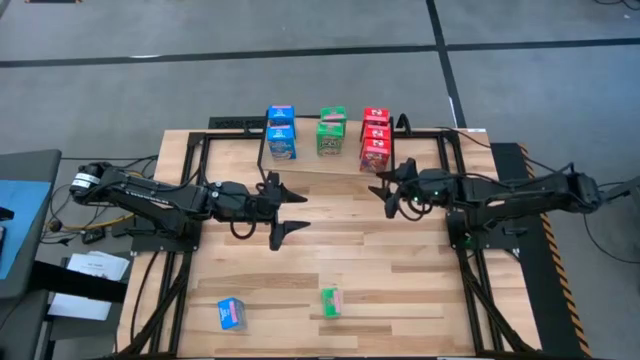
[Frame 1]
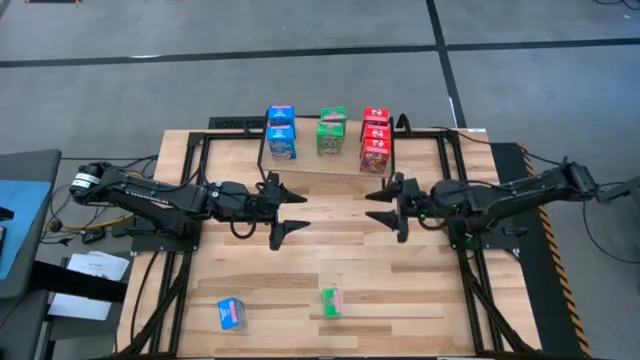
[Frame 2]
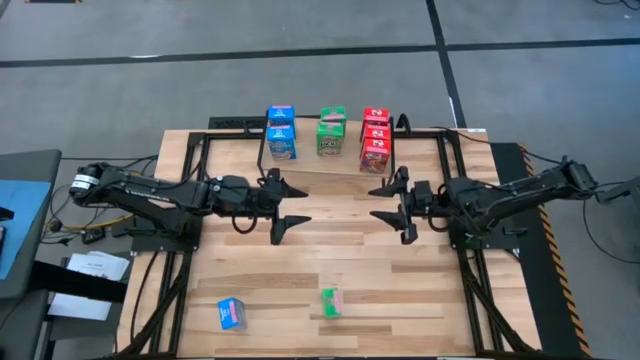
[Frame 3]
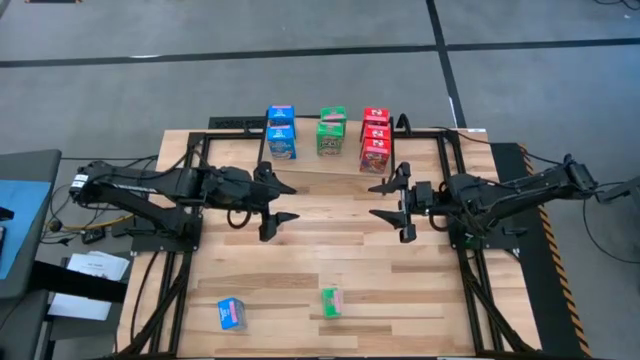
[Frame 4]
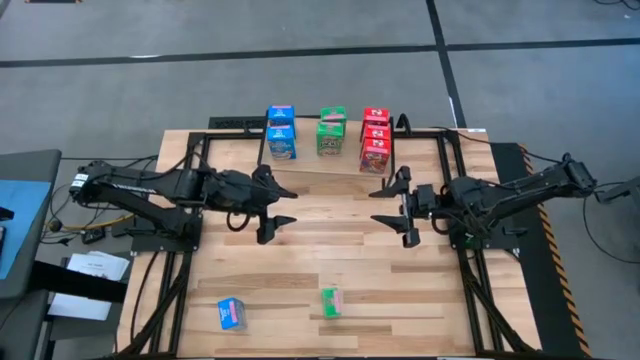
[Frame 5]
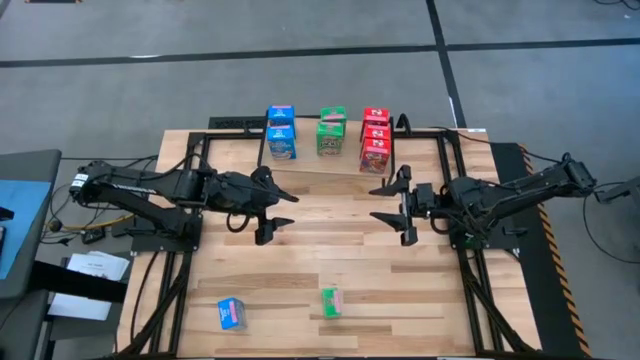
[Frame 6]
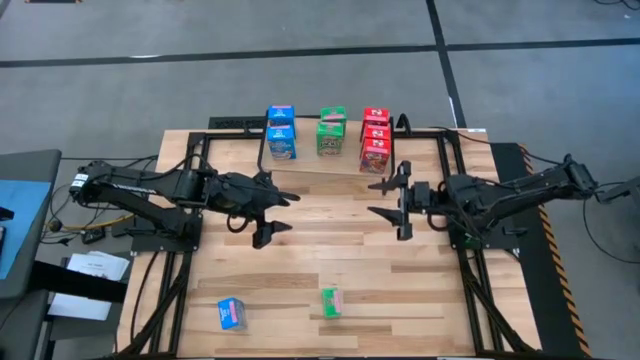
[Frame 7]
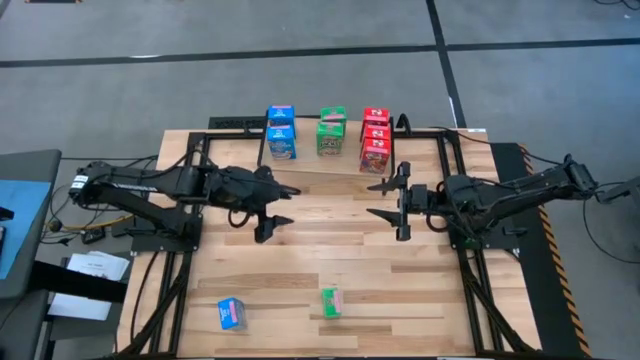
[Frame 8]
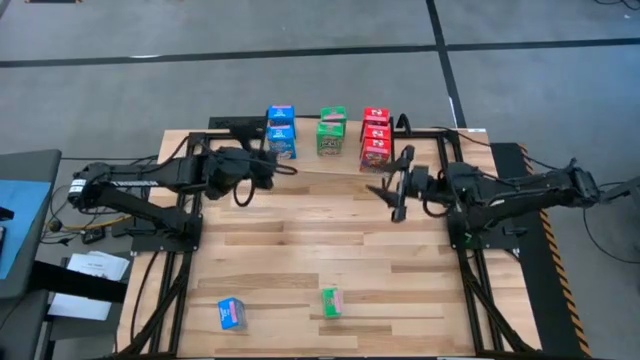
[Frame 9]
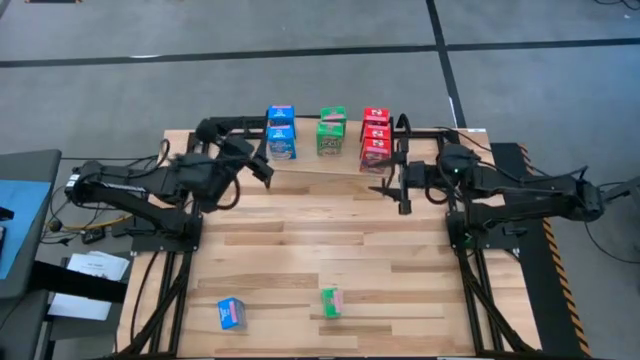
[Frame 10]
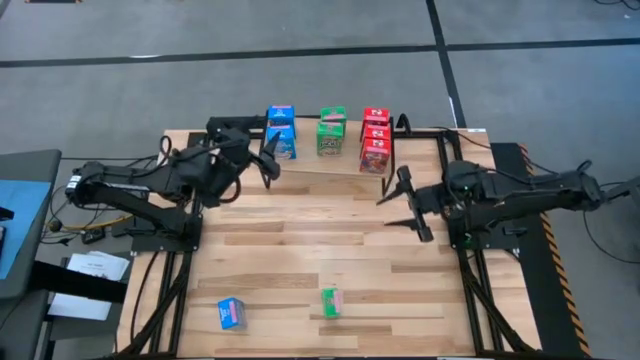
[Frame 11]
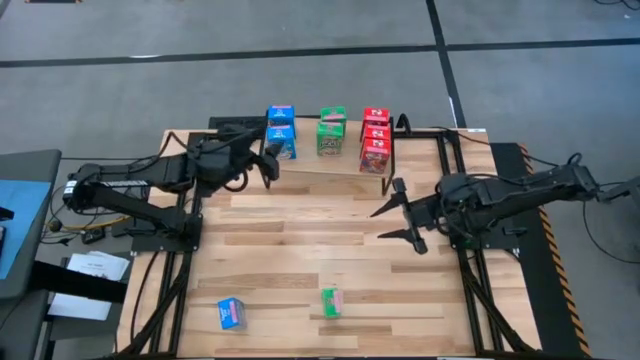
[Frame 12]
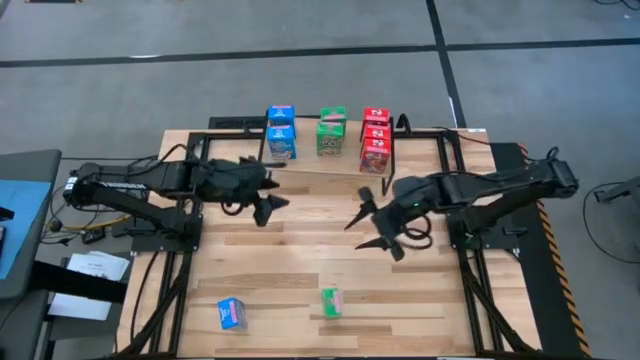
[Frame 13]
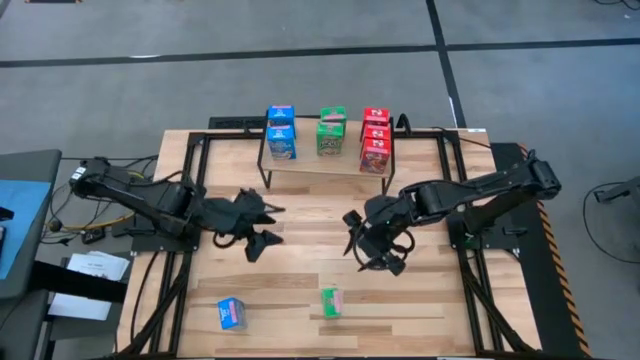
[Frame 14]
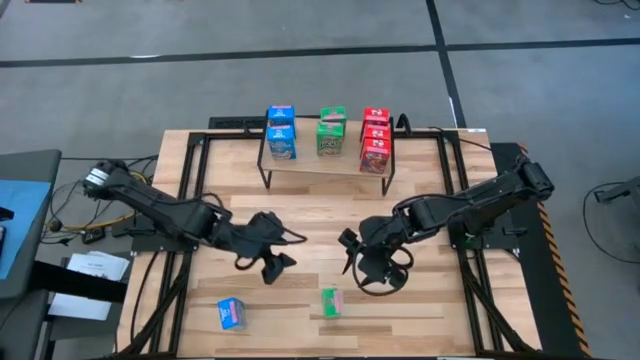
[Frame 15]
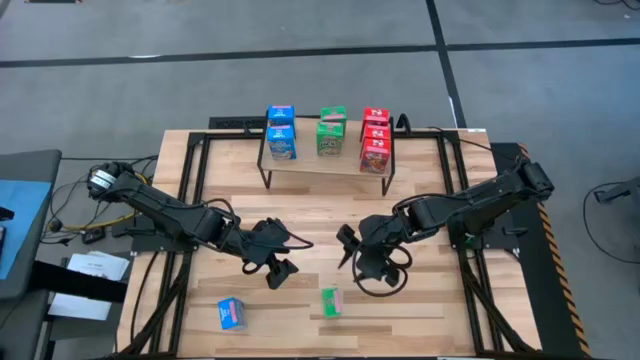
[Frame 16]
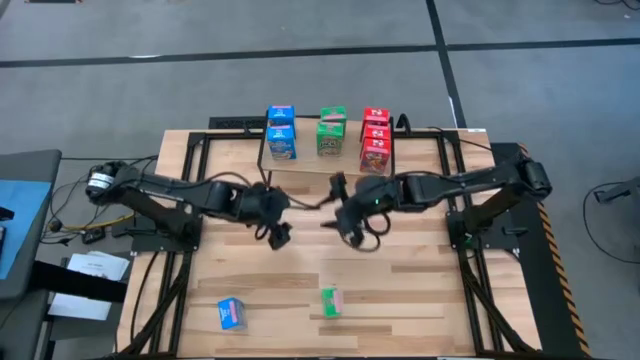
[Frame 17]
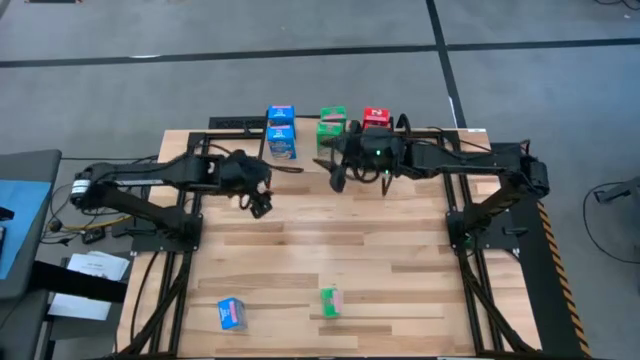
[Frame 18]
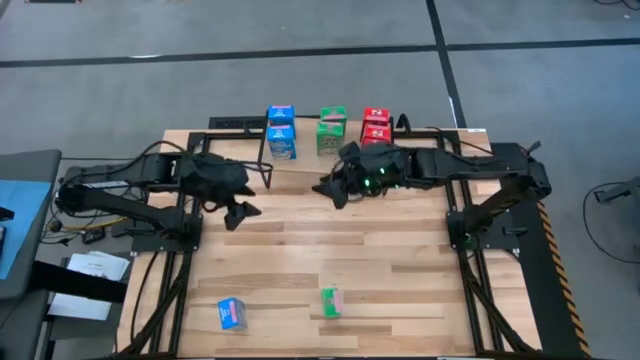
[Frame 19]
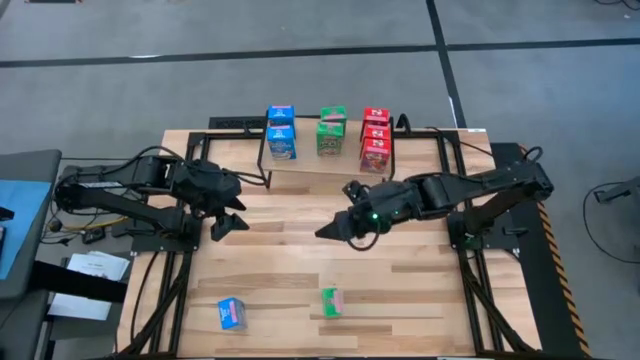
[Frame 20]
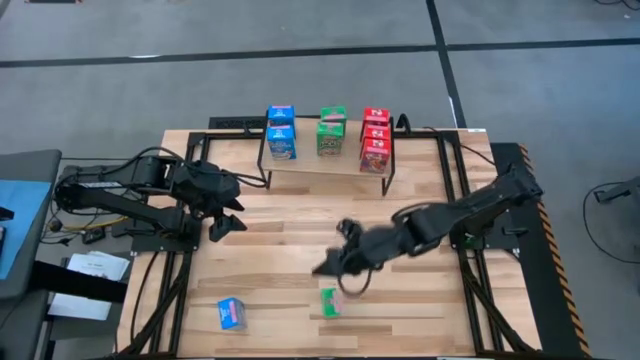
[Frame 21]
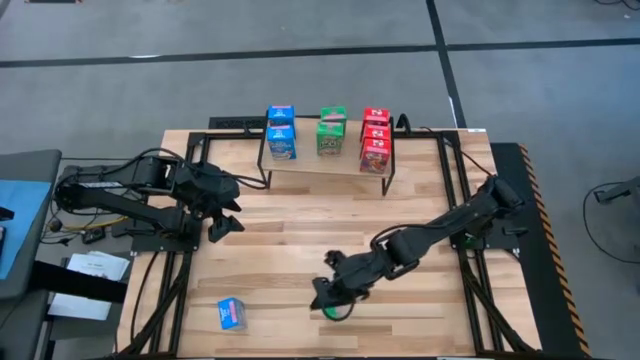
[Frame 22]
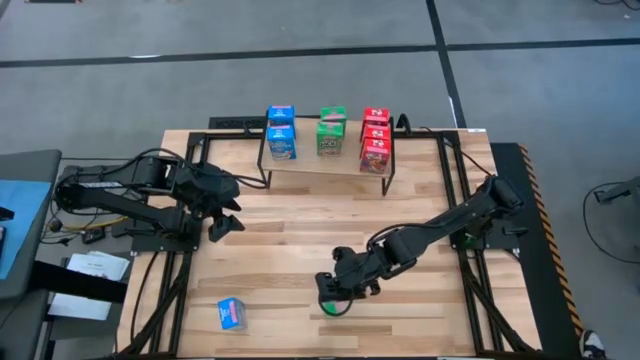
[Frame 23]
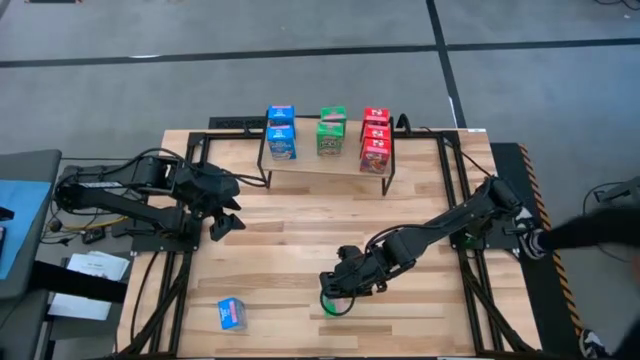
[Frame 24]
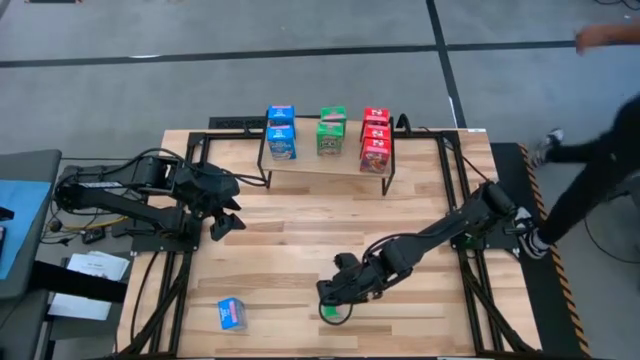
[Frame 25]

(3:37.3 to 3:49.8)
Task: Stack cereal on shelf
Put the green cereal box on the shelf aligned with the other green cereal boxes

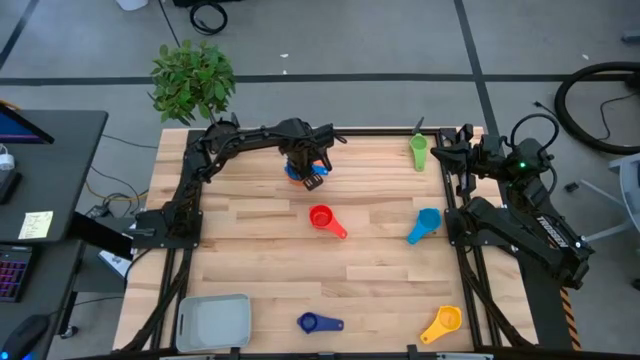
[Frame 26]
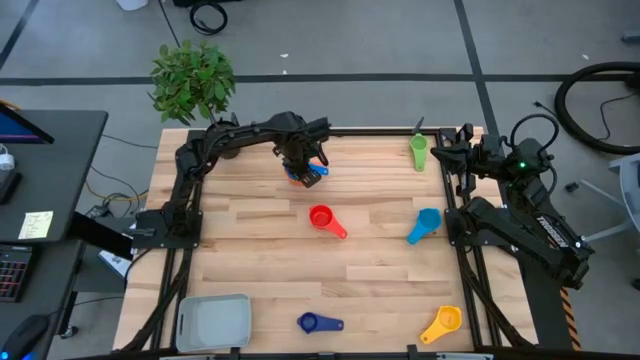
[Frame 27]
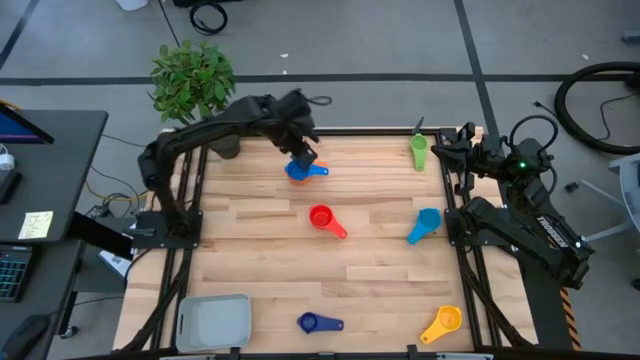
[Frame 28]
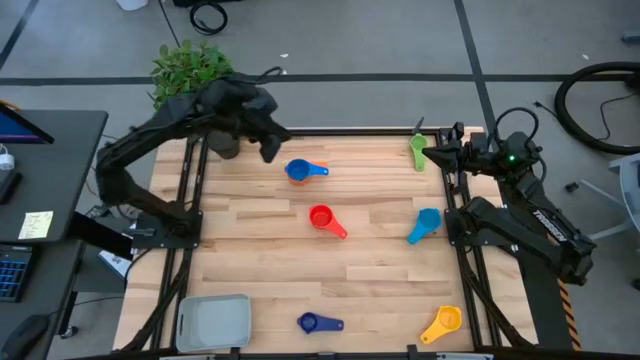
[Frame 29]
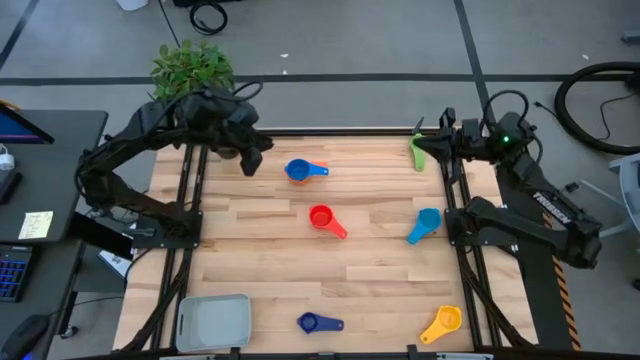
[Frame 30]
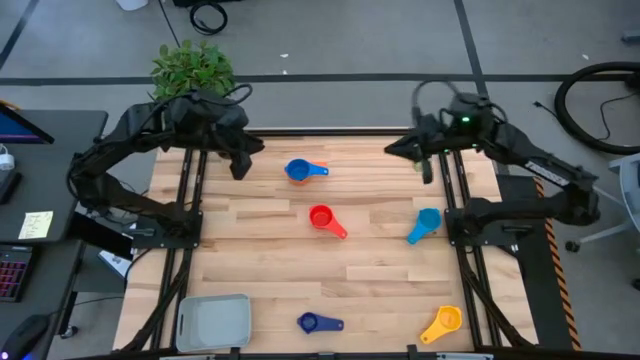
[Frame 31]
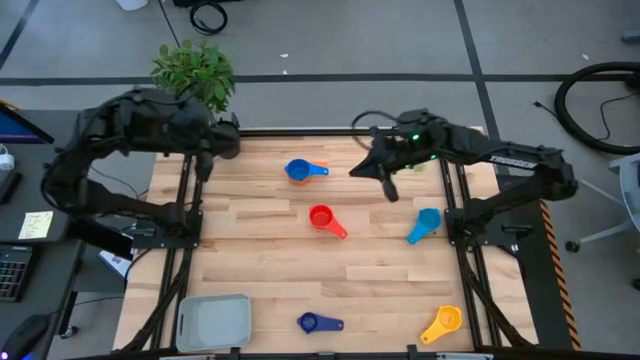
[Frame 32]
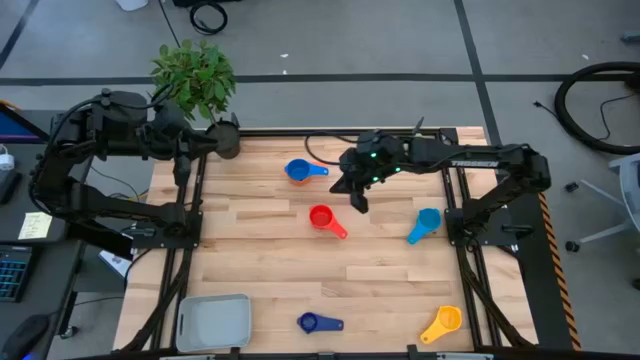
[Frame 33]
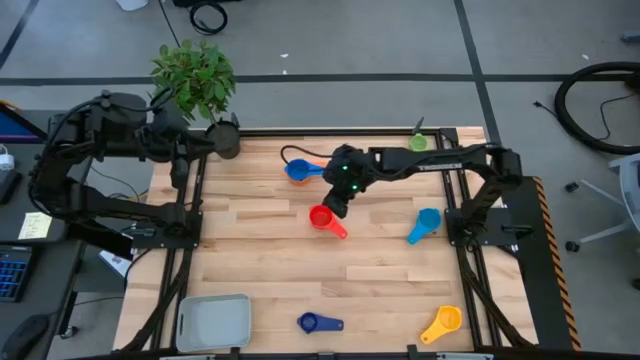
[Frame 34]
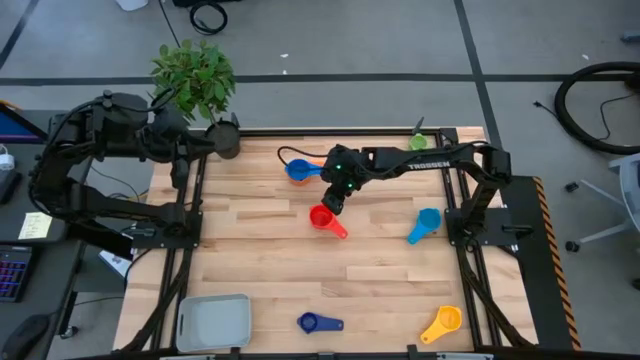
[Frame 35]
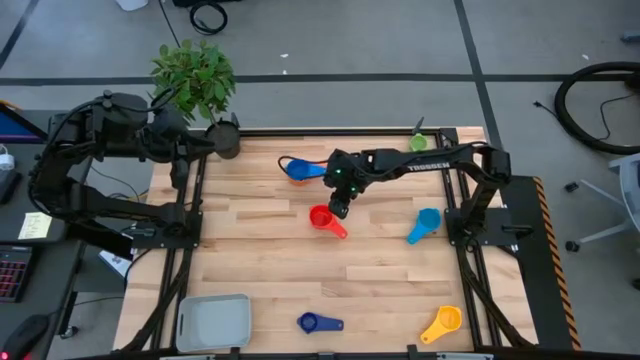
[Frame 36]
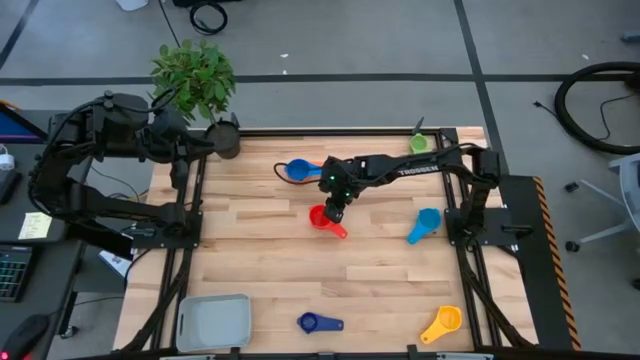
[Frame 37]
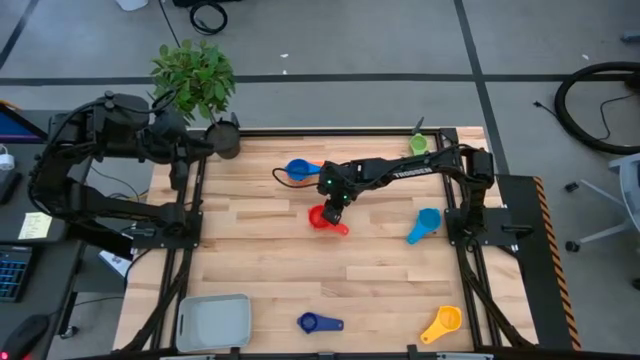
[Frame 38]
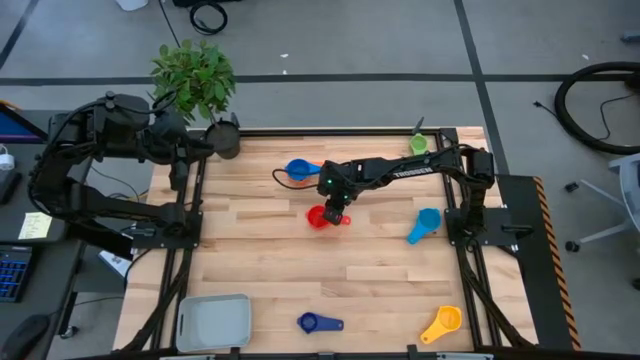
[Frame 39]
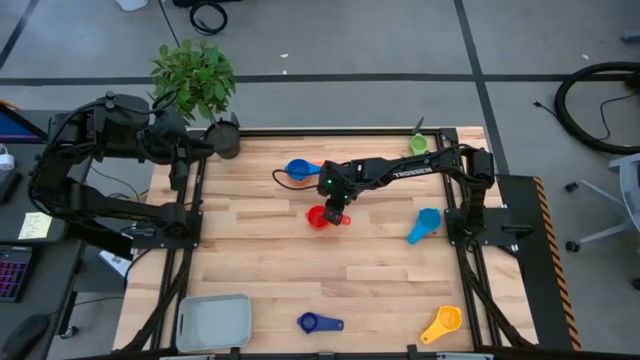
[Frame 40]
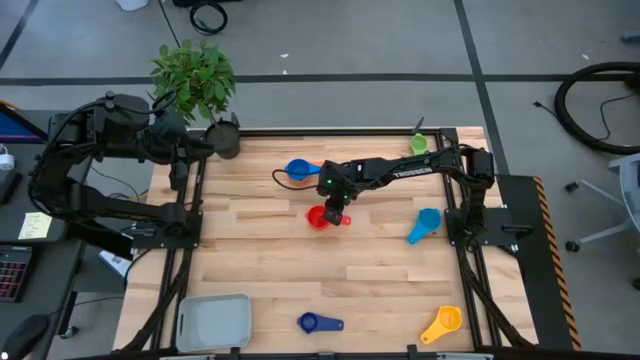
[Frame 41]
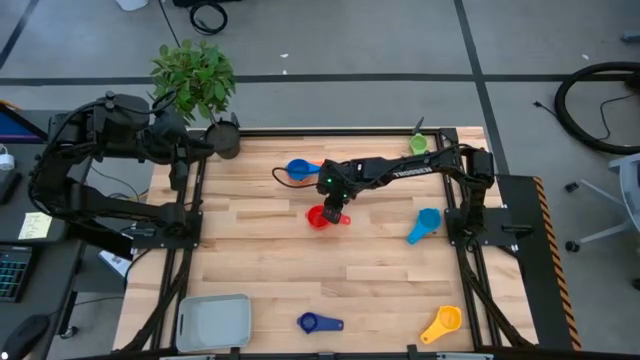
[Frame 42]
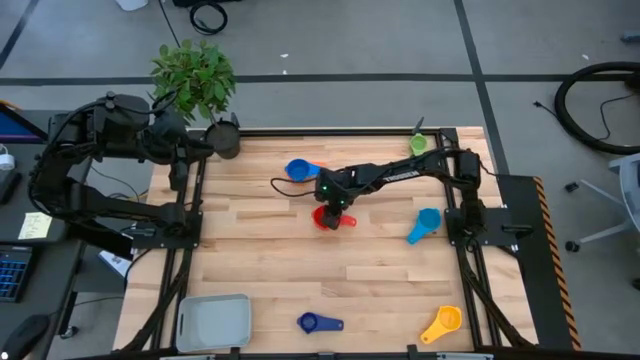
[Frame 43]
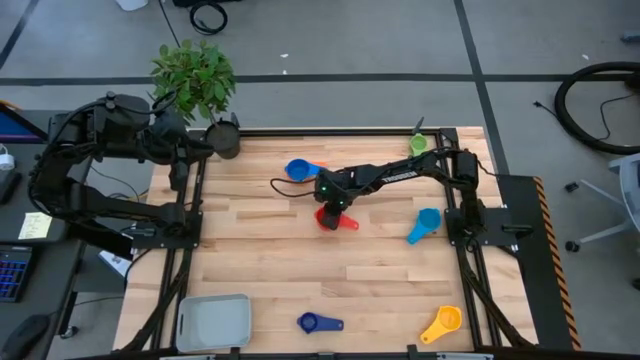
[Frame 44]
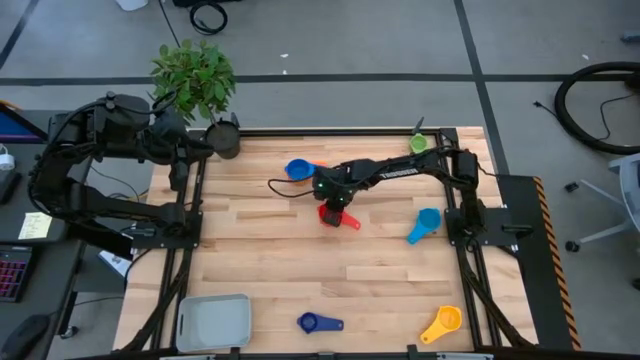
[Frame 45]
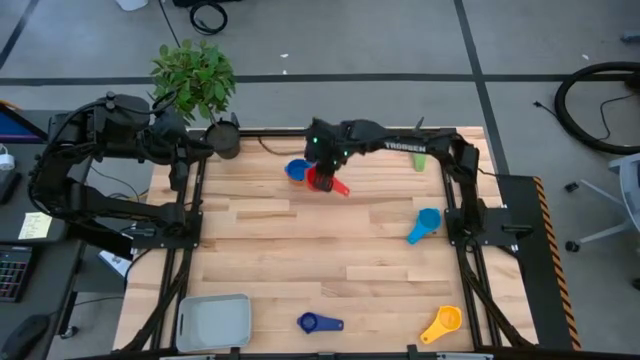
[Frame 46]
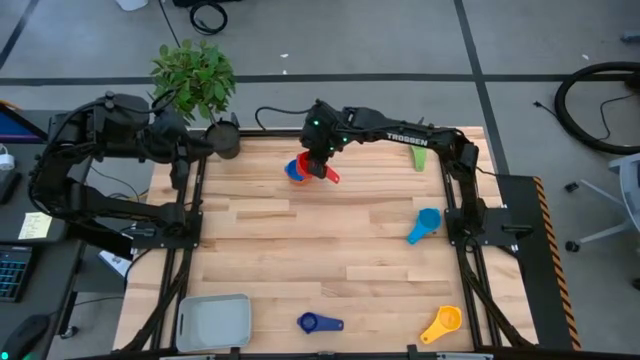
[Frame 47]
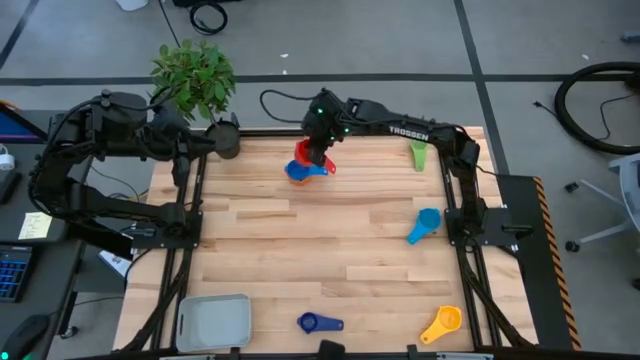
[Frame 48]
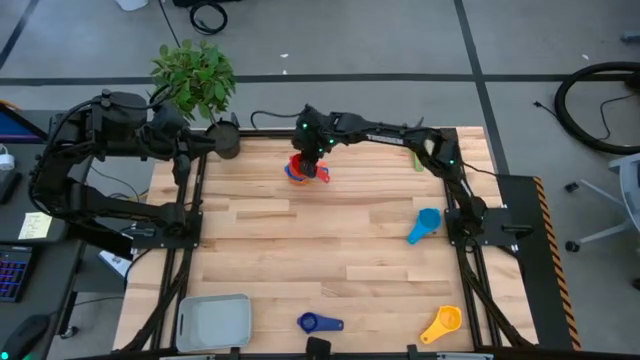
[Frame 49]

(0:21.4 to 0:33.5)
Task: Nest measuring cups in basket
Stack the red measuring cup on top of the light blue measuring cup
